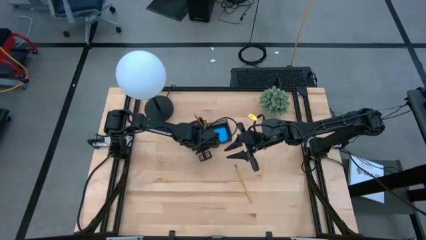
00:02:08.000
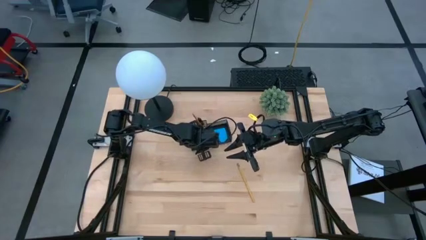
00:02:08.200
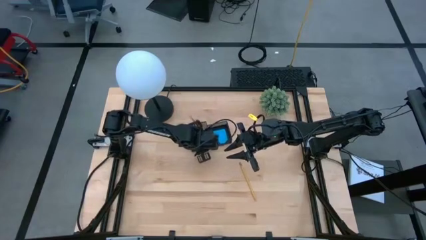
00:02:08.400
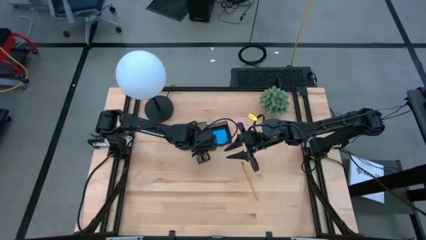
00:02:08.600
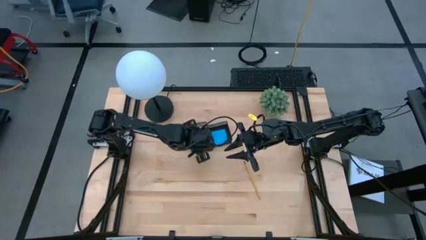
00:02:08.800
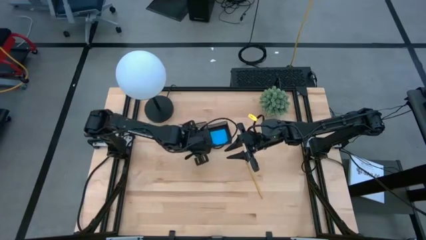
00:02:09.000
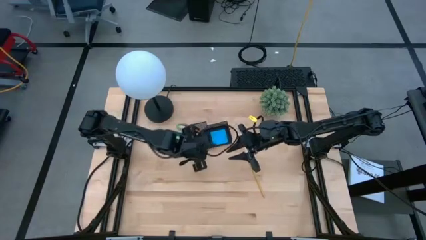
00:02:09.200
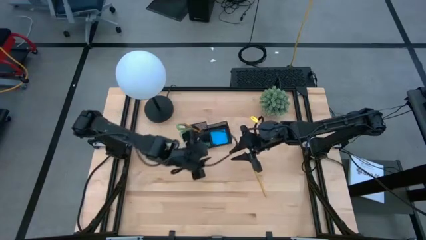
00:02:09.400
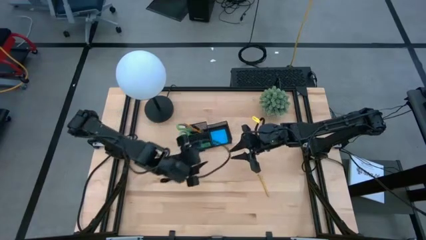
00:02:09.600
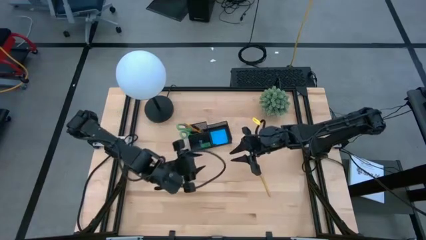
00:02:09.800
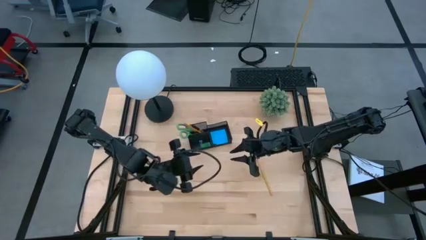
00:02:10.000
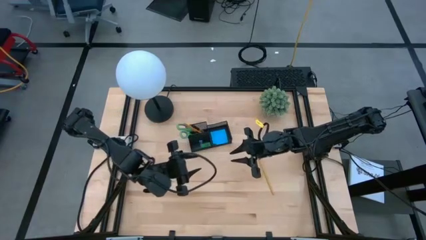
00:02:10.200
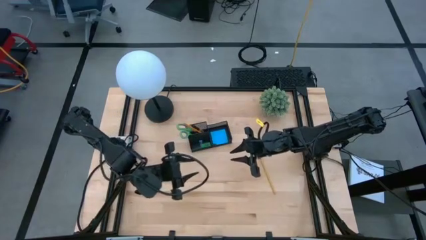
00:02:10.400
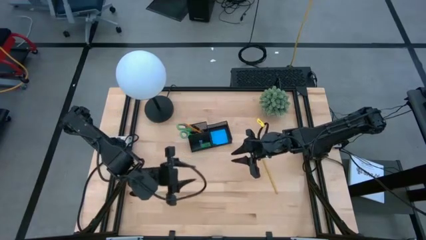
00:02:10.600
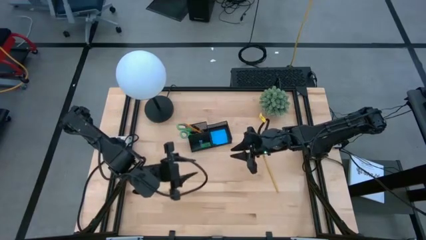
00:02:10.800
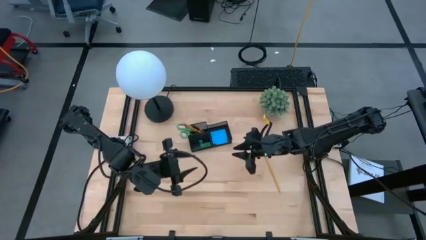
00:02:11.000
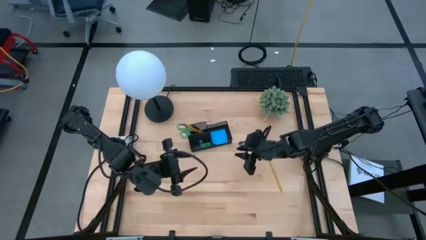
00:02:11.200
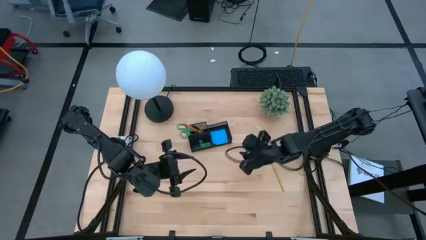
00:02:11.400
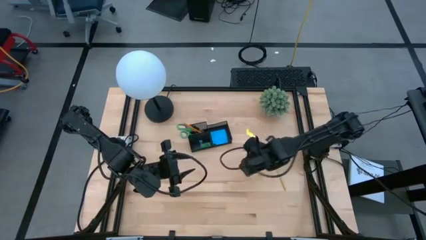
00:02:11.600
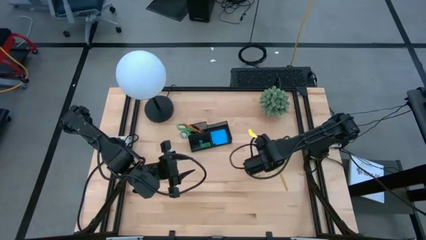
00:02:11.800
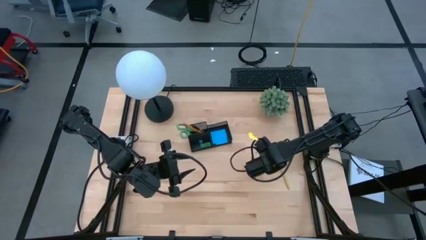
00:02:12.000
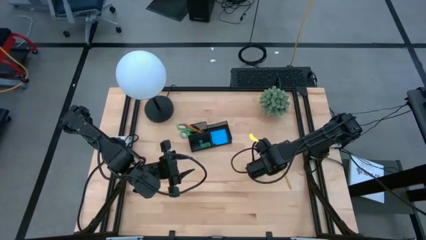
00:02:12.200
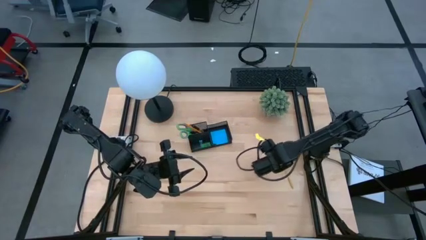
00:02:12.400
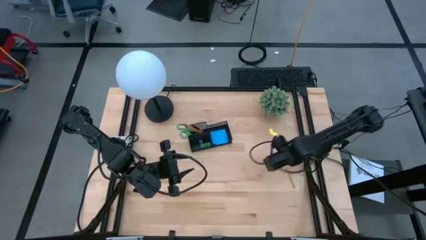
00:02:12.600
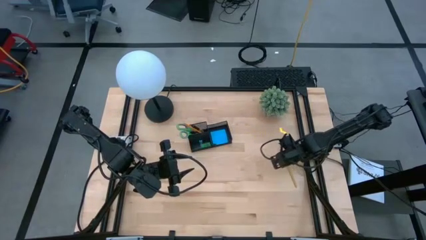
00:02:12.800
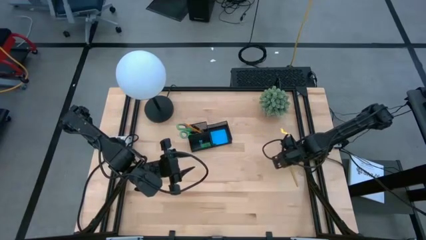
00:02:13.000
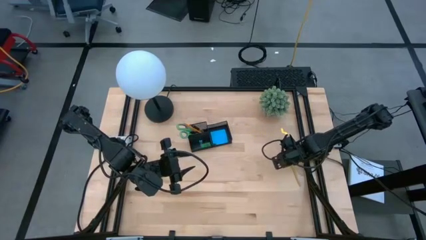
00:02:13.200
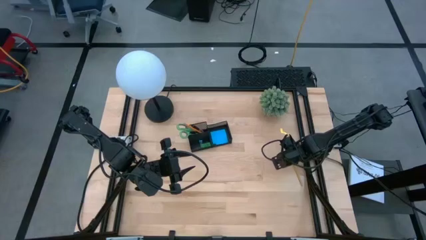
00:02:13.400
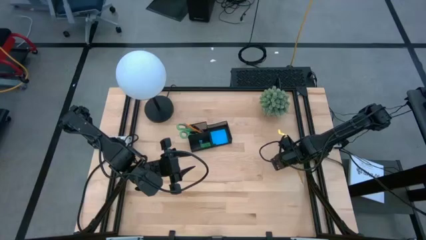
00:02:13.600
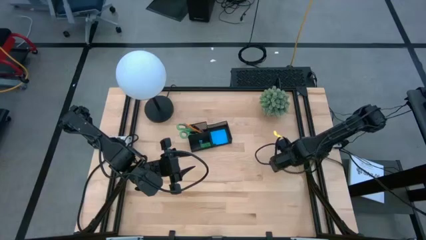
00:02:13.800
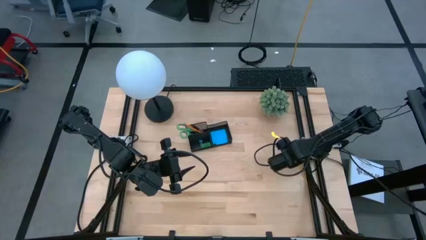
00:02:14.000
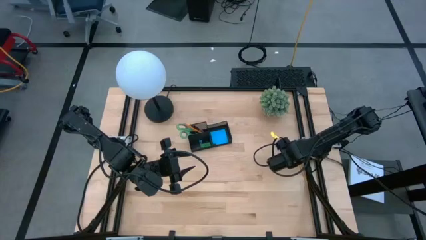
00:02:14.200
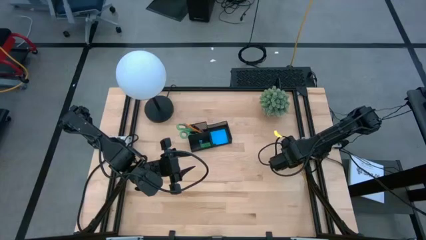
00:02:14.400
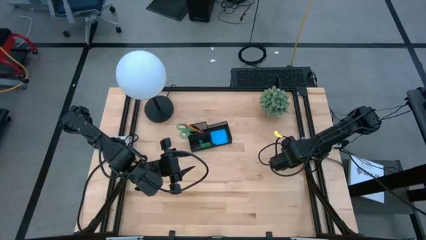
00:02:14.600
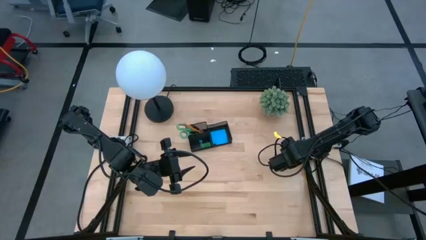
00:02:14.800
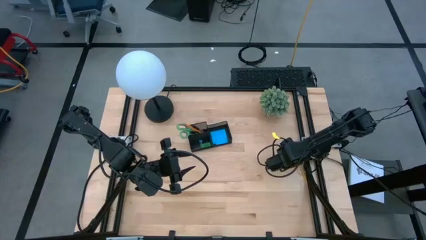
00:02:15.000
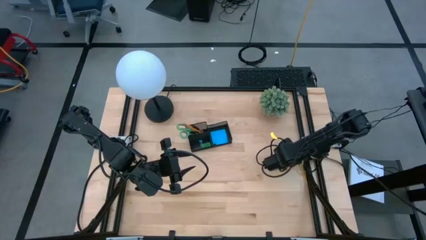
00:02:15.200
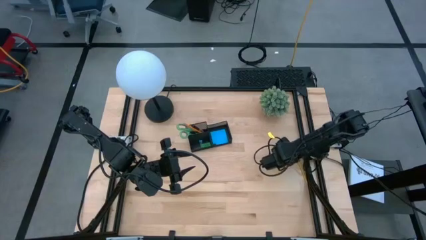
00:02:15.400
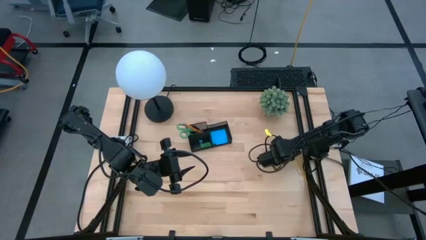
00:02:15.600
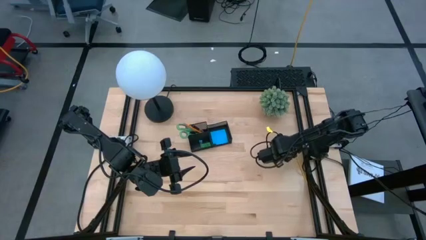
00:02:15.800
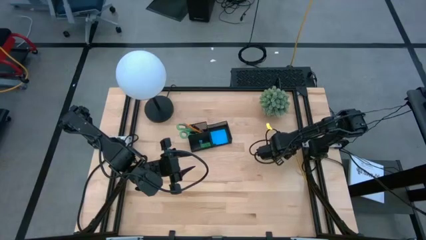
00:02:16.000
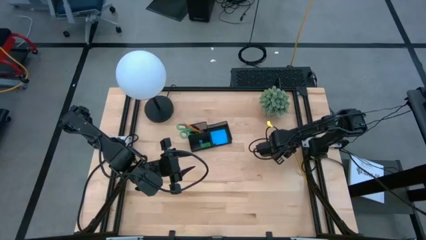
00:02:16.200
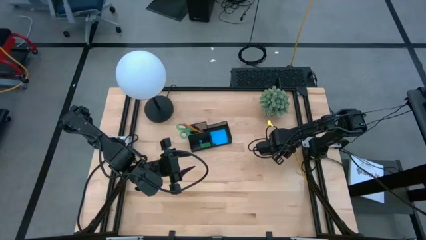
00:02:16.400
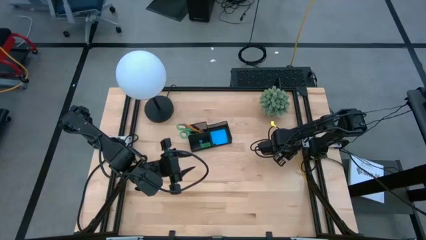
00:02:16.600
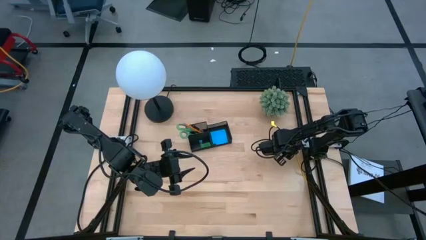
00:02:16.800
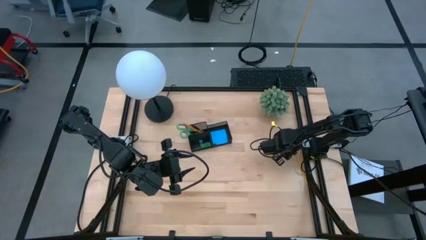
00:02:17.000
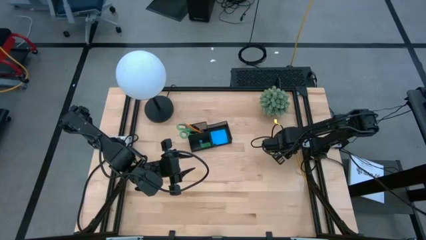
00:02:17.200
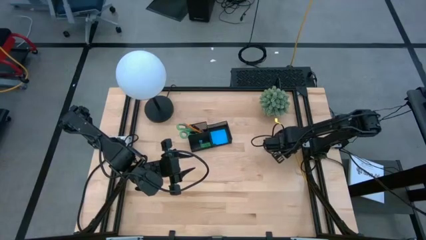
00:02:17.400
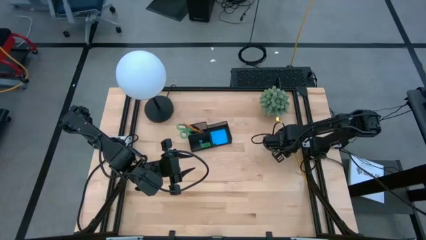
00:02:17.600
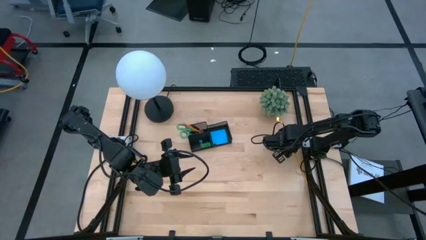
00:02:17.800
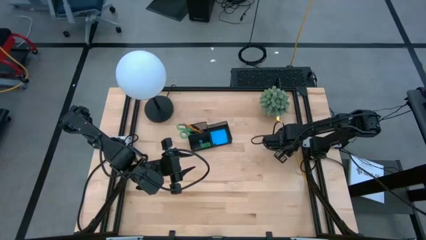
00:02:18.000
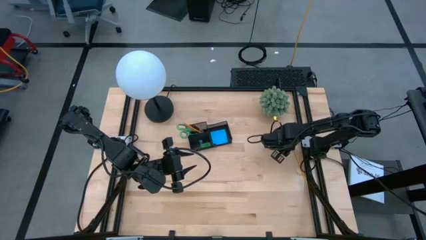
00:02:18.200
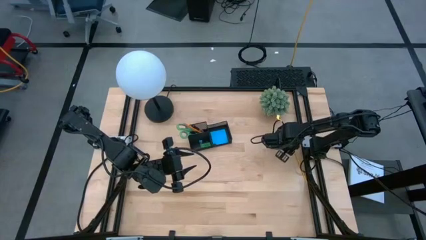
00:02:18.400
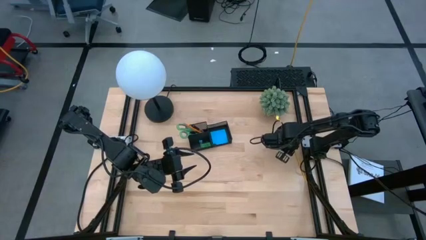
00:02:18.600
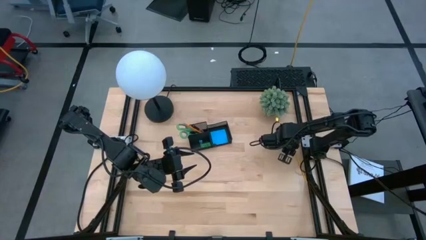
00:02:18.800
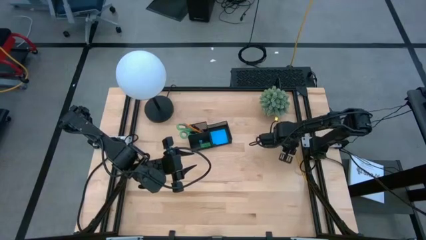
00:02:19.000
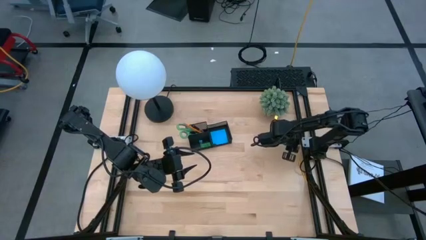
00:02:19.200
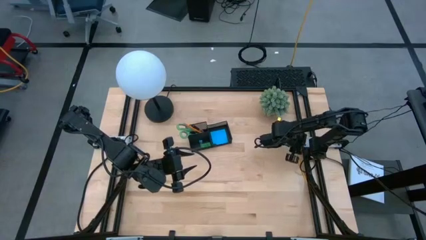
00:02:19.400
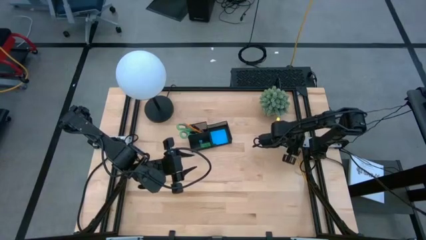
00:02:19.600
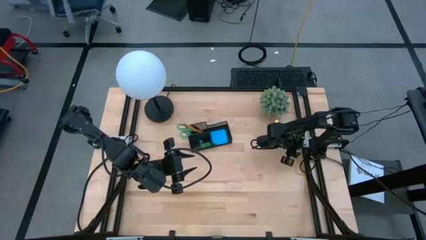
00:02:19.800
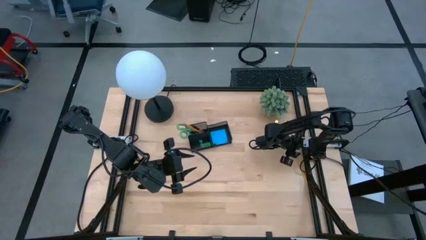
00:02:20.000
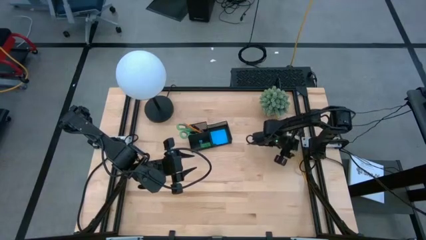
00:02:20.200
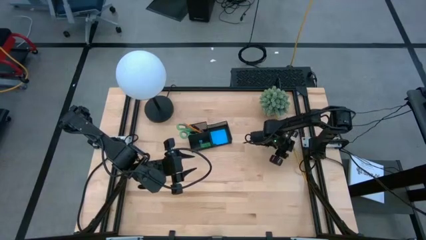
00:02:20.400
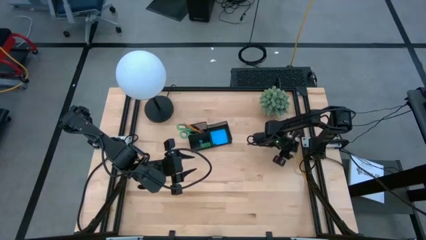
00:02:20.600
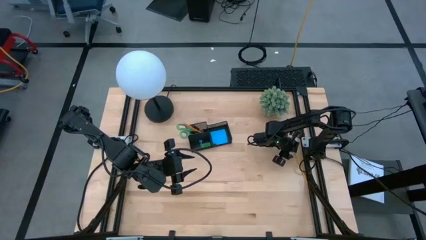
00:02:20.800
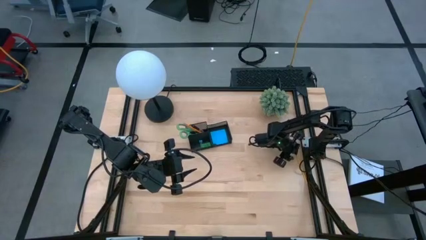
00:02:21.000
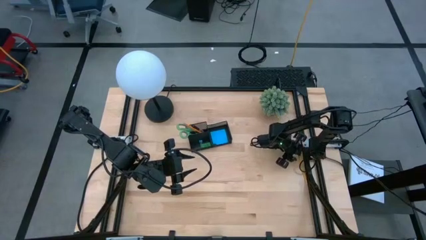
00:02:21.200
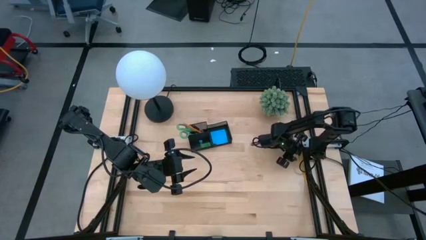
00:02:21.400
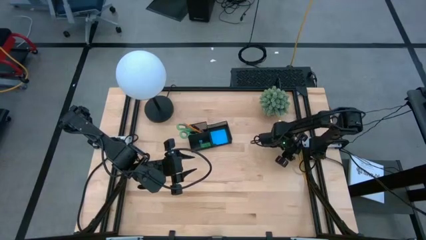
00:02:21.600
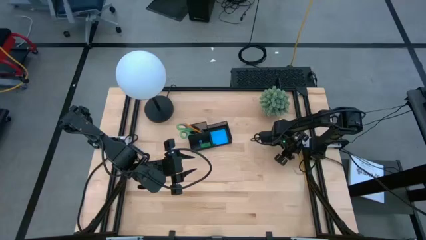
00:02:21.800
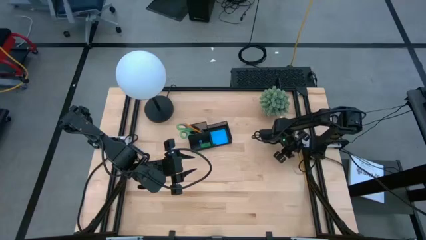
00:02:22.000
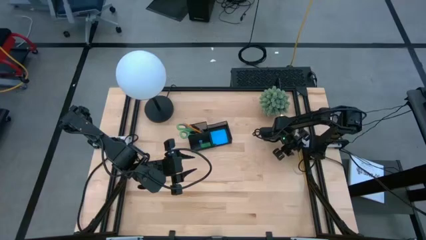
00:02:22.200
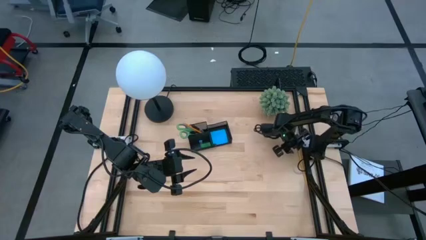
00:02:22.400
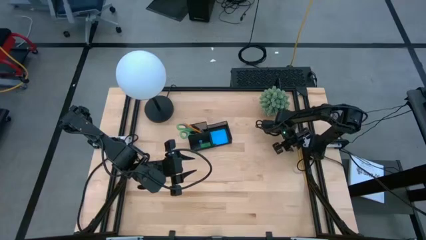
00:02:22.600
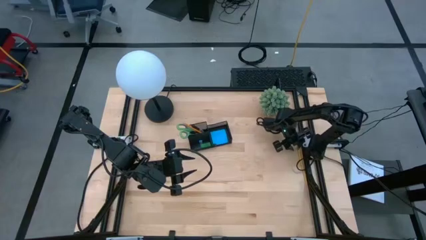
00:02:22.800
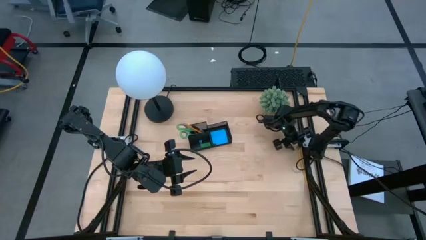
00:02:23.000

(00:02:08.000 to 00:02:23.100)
Task: Pick and place office supplies into organizer
Put the yellow pencil into the black desk organizer

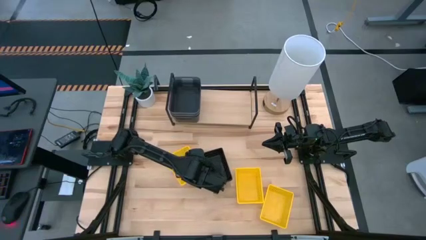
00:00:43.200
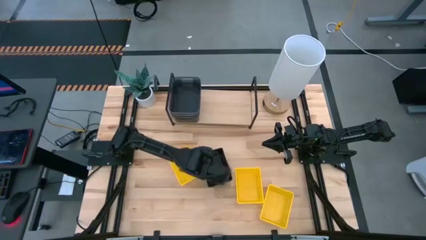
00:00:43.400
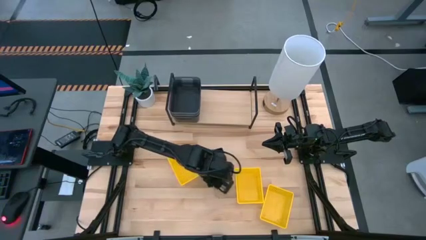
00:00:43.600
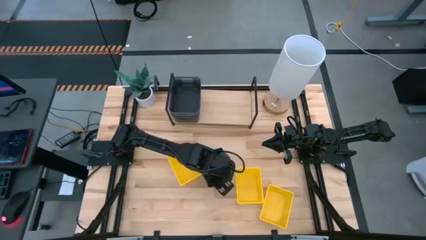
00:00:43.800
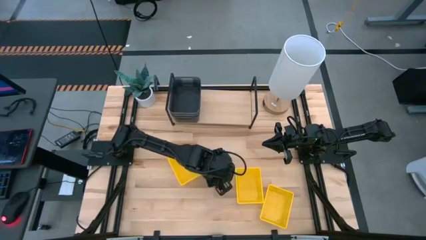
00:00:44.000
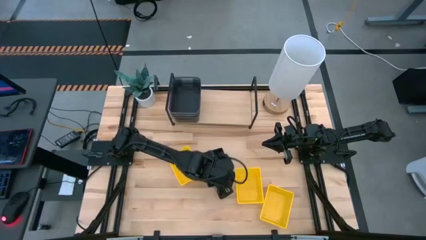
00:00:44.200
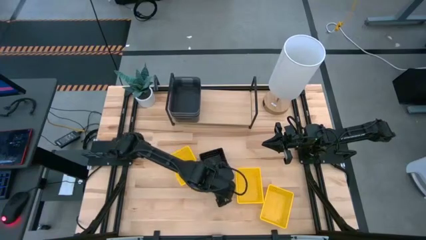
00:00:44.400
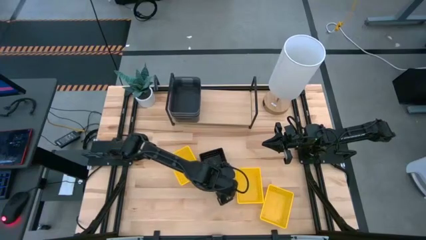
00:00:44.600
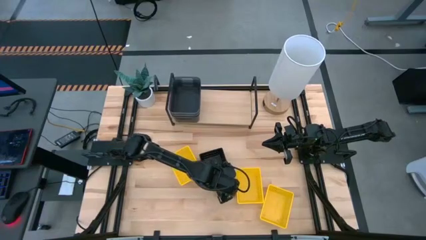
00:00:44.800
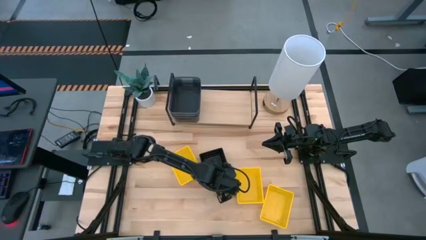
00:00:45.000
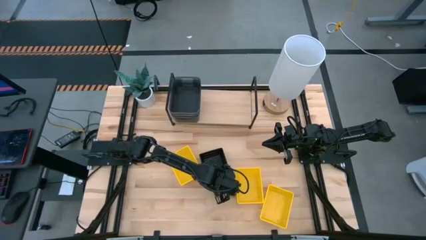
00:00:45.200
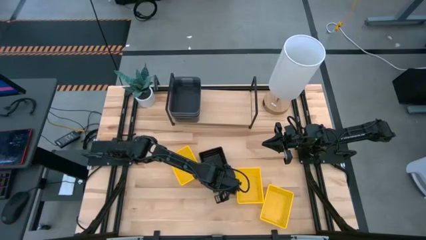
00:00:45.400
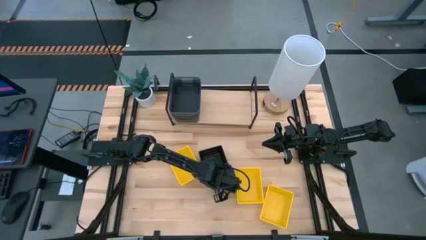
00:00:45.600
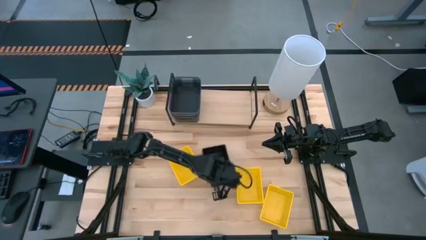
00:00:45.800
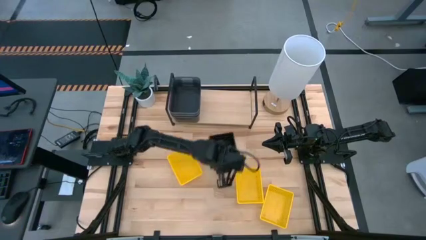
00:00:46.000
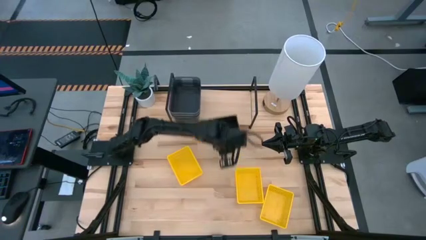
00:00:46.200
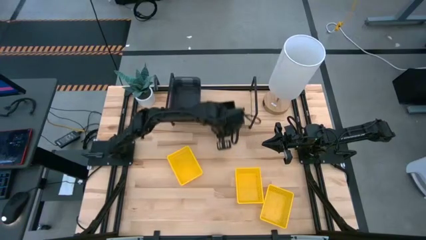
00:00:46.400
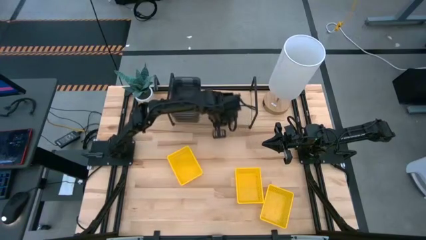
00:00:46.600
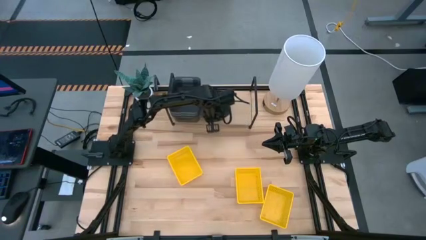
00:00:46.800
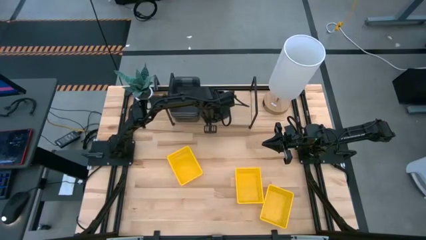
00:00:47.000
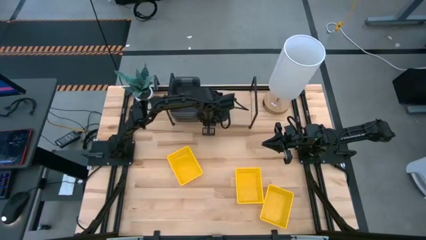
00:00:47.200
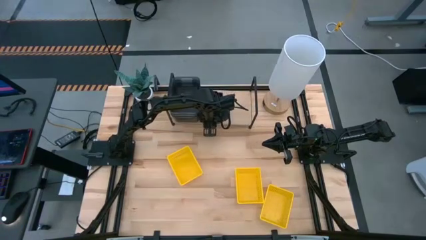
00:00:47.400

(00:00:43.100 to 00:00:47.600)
Task: Stack baskets on shelf by color
Put the stacked black baskets on the shelf
